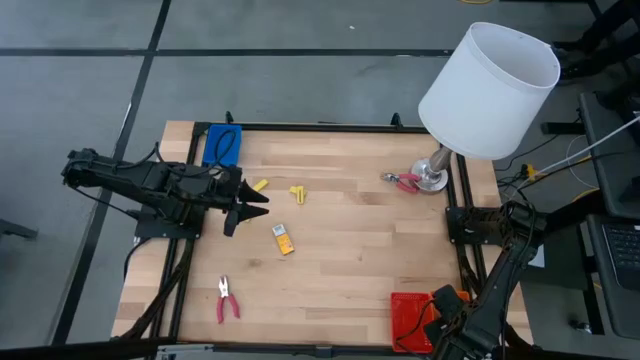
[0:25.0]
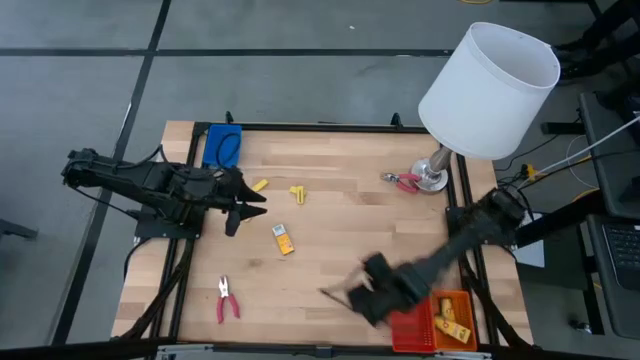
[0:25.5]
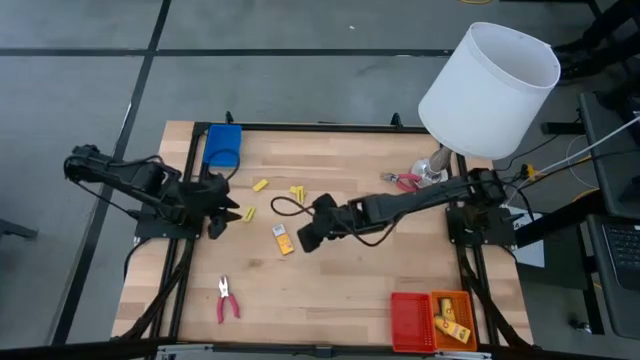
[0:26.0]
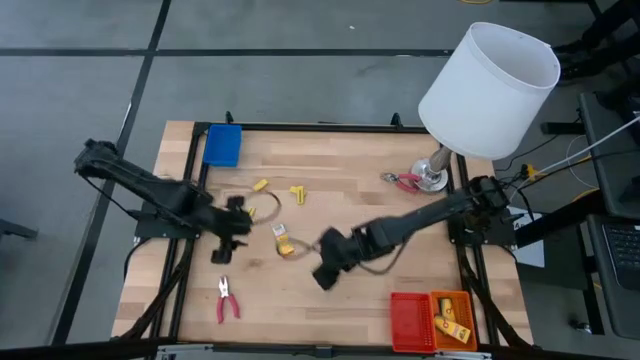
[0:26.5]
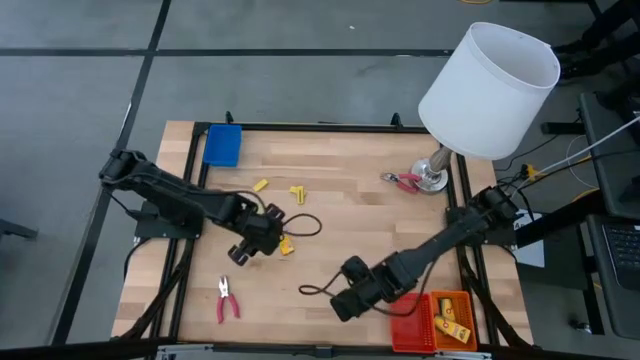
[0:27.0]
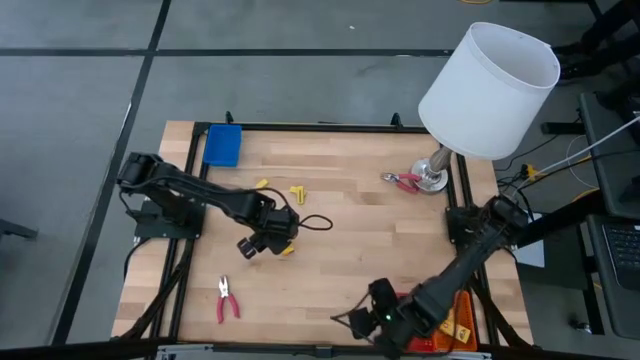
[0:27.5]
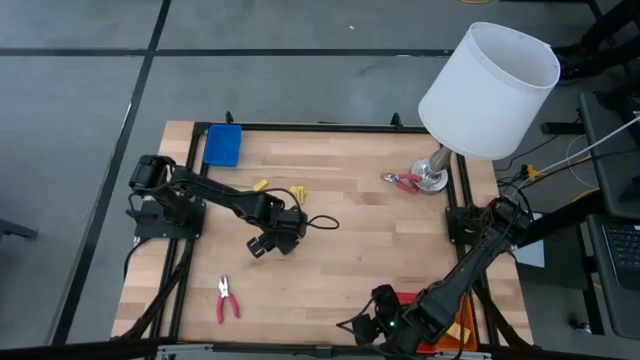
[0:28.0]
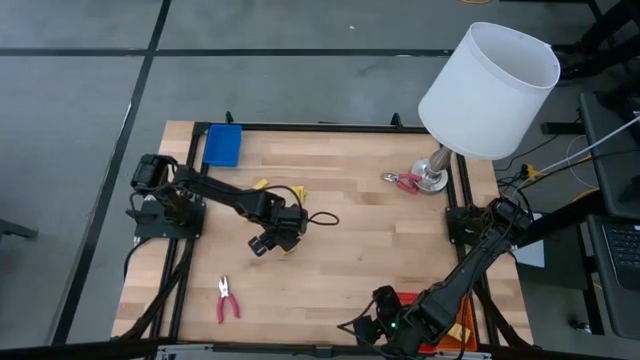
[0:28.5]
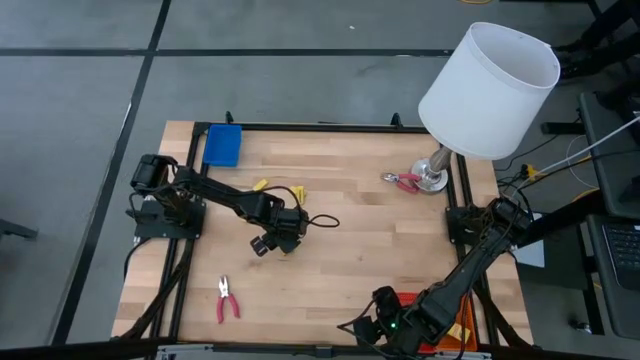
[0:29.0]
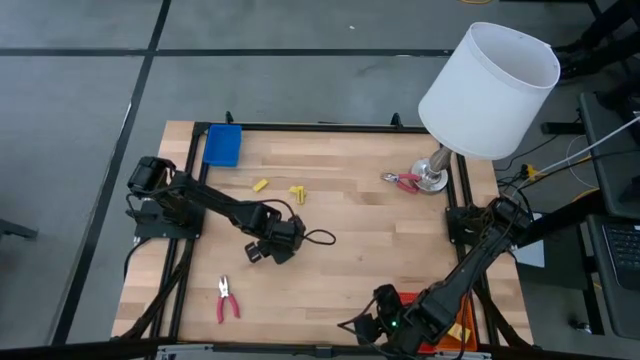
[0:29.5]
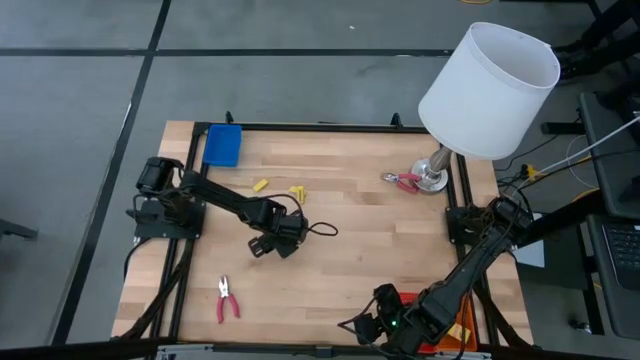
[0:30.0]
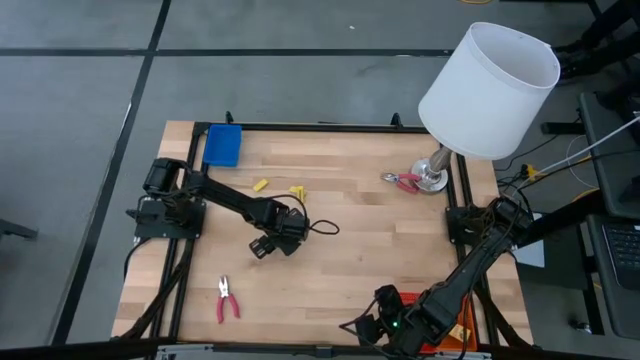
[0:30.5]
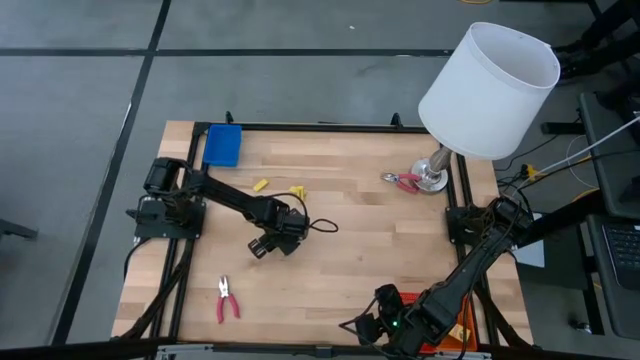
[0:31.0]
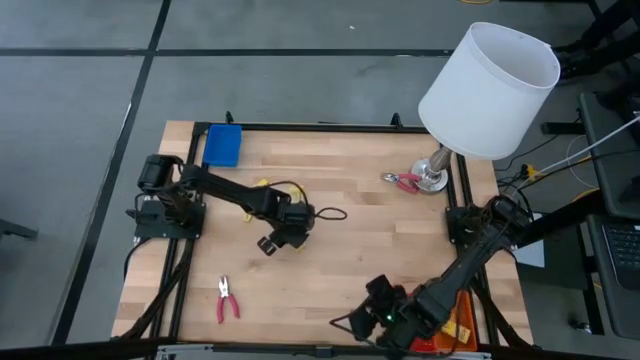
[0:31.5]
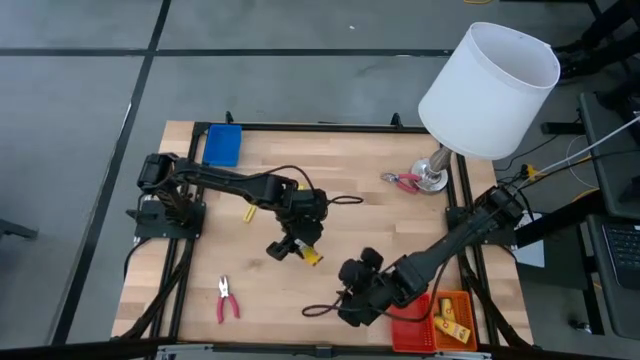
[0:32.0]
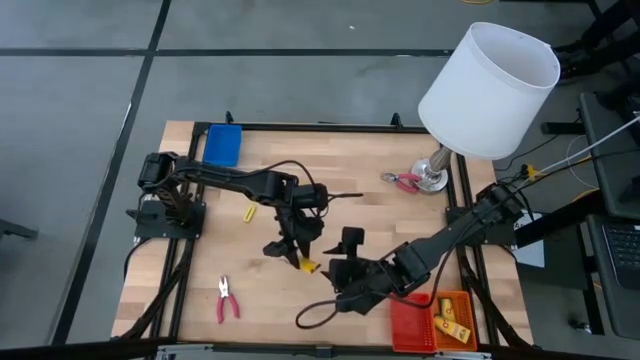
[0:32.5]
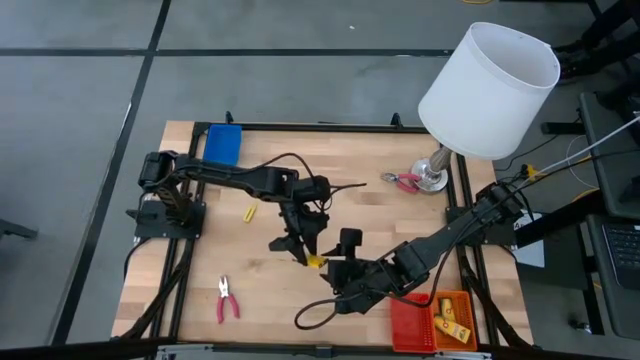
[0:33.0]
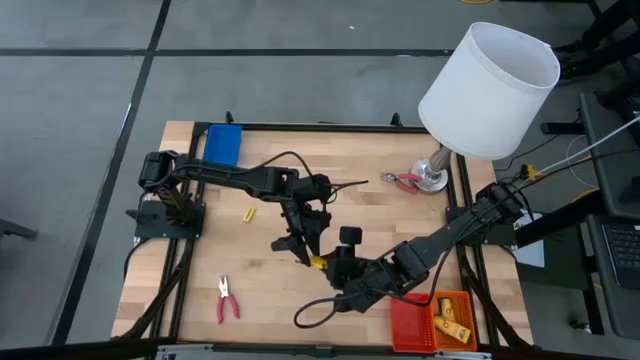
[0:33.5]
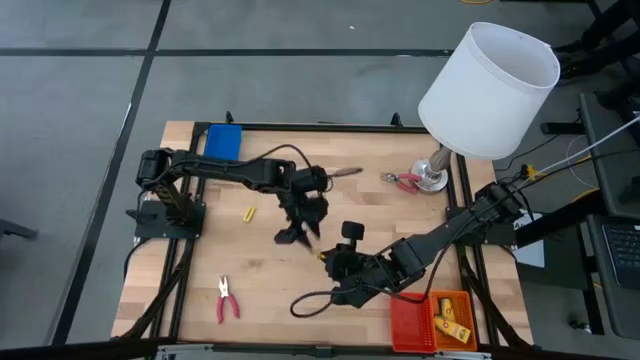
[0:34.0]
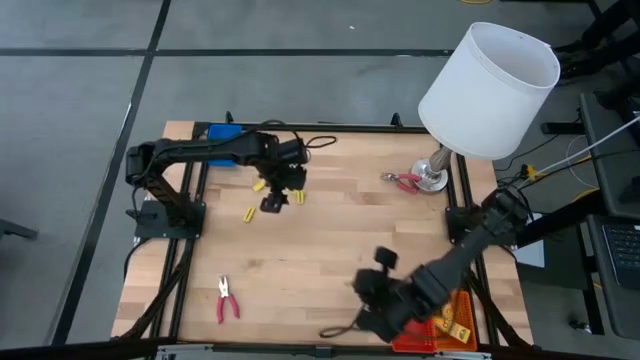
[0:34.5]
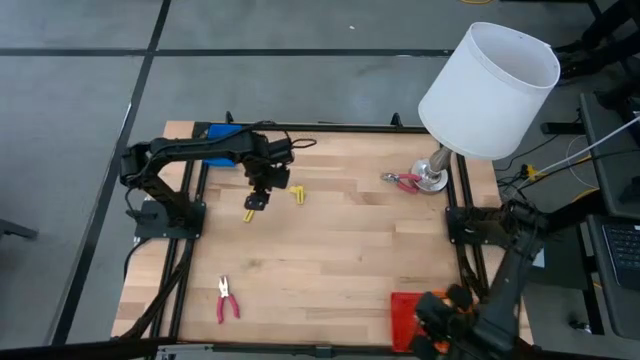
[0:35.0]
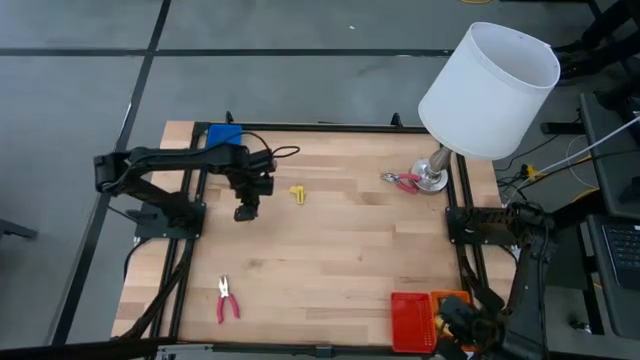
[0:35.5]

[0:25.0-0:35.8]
Task: Pick & Place School Supplies
Put the yellow crayon box into the orange bin

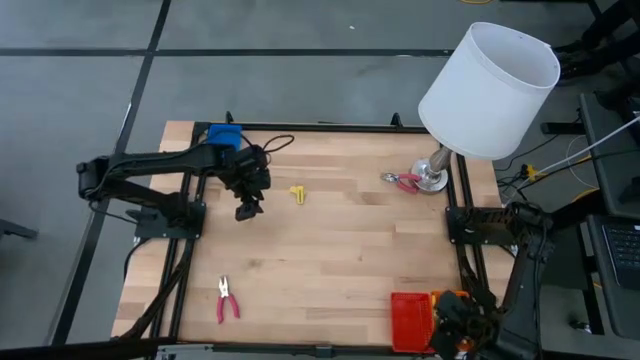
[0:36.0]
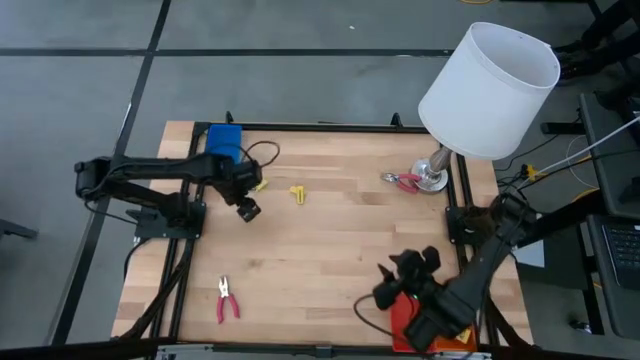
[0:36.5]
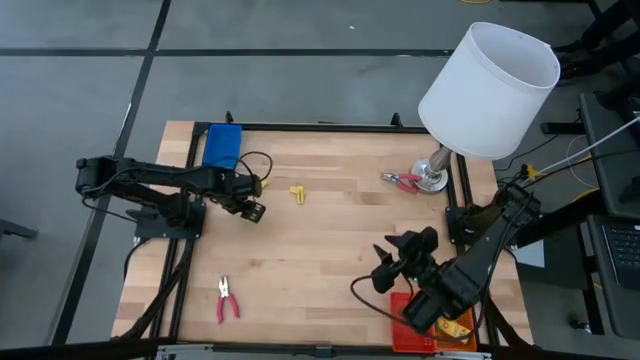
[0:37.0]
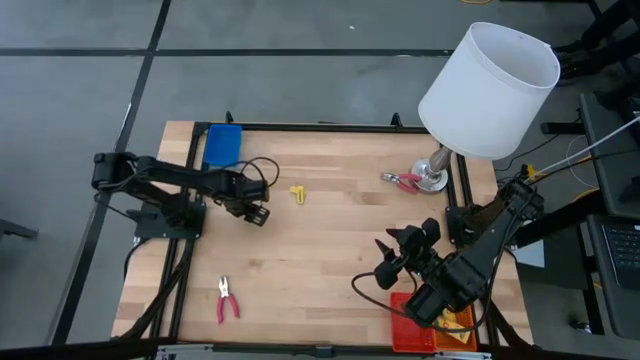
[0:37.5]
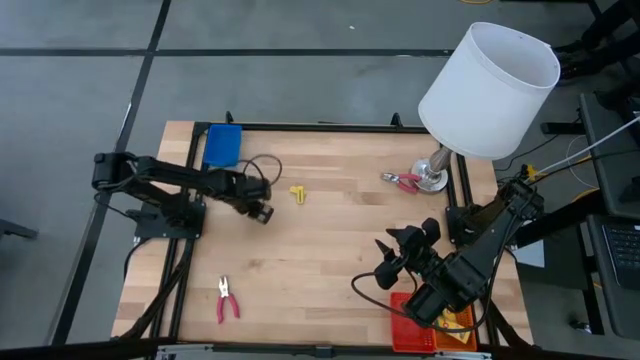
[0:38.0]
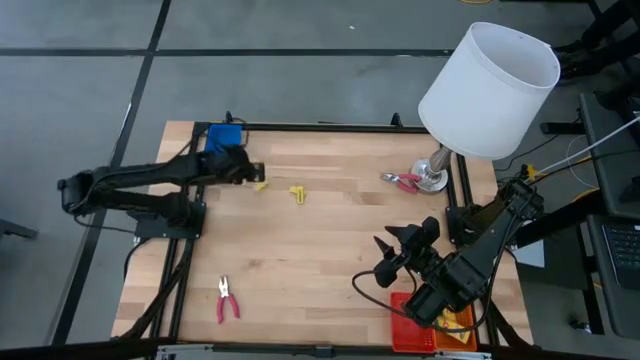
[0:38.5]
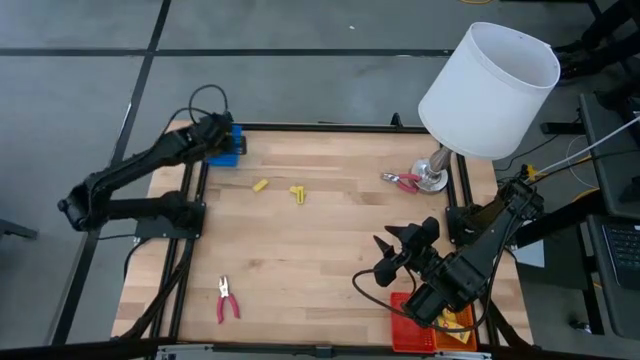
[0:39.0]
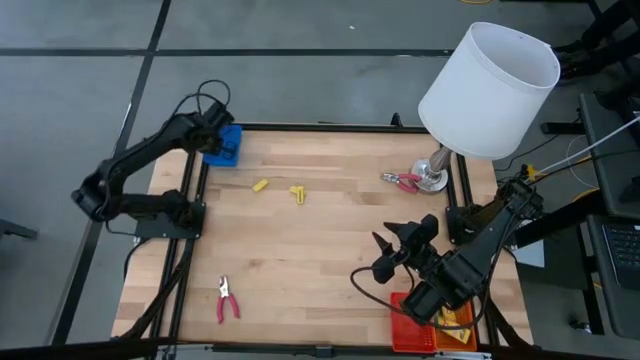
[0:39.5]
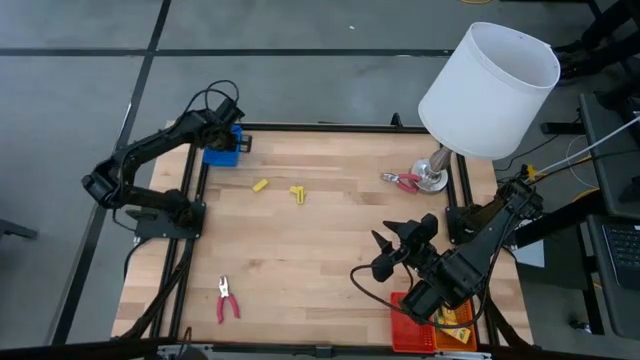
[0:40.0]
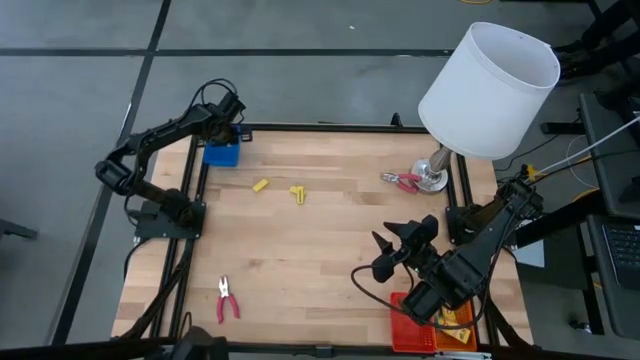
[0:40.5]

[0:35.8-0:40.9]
Put the yellow eraser into the blue bin

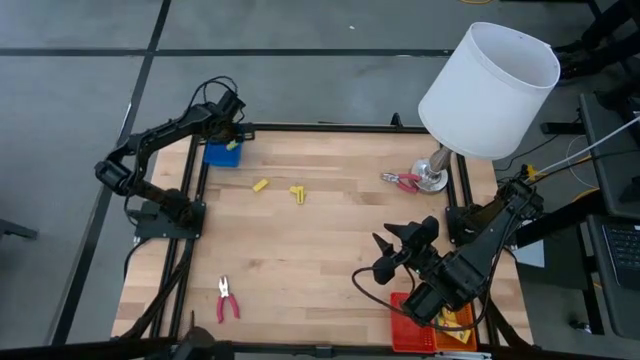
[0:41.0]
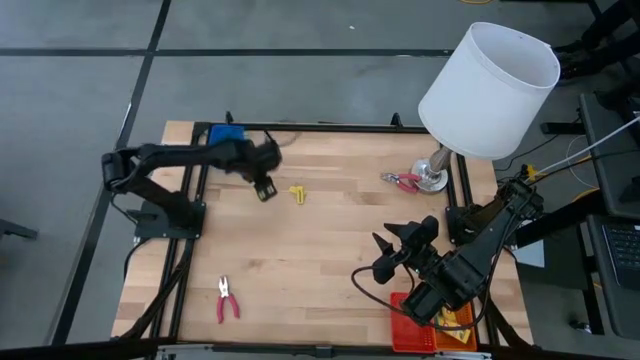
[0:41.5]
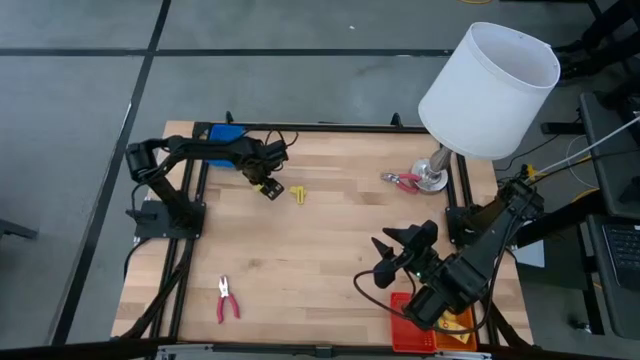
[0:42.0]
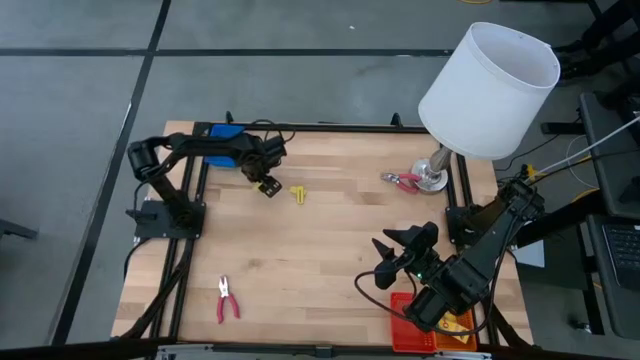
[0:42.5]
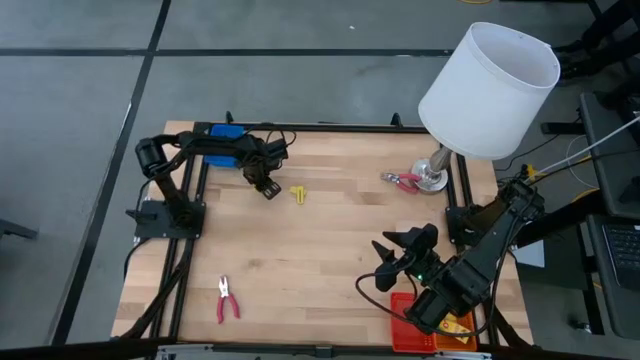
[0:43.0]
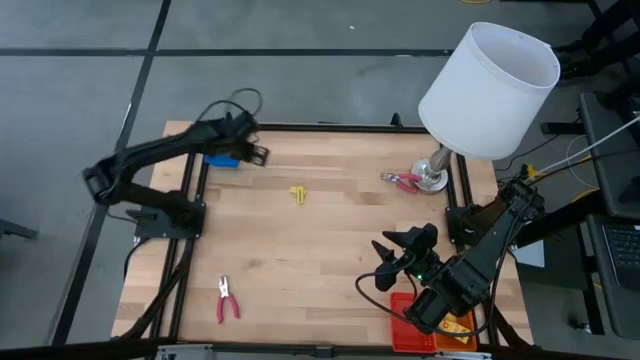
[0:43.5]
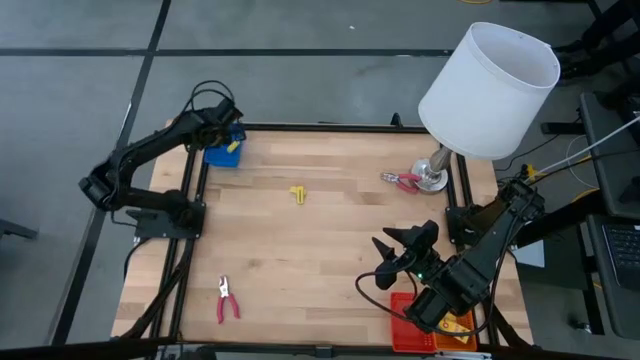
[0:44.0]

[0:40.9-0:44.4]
Put the yellow eraser into the blue bin

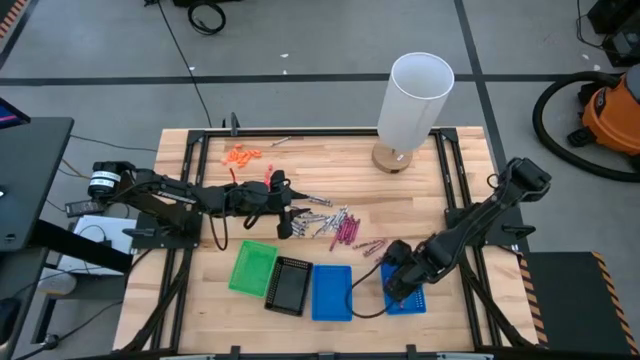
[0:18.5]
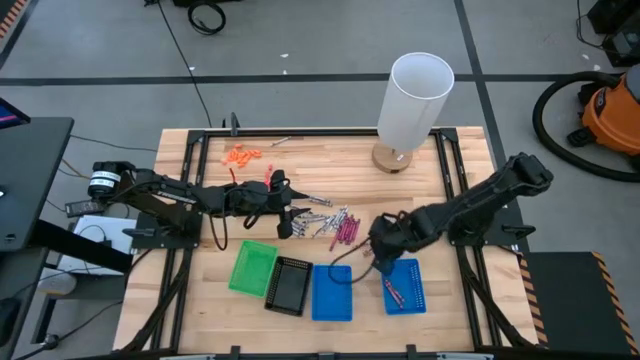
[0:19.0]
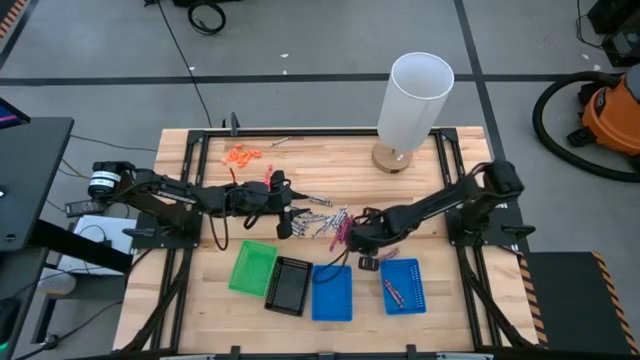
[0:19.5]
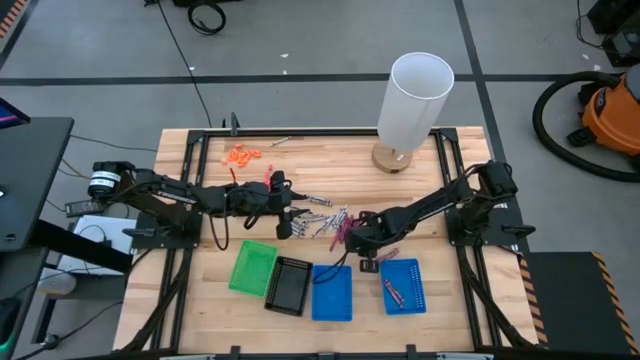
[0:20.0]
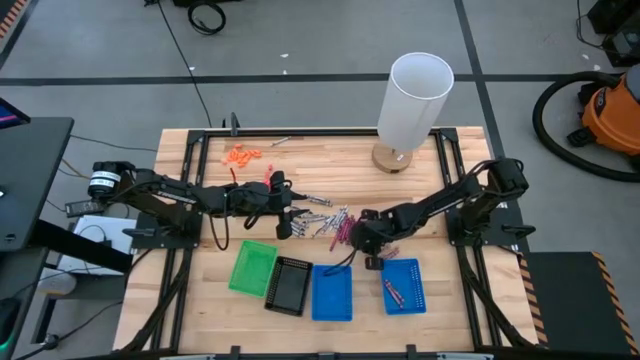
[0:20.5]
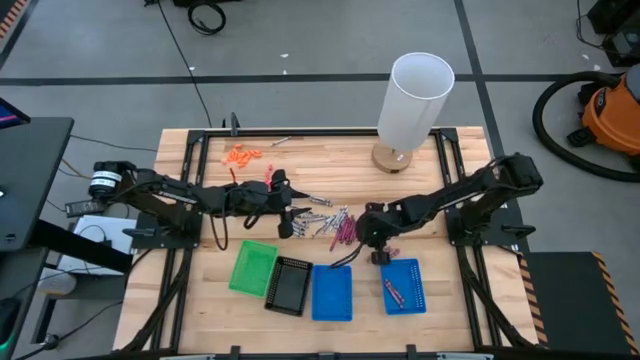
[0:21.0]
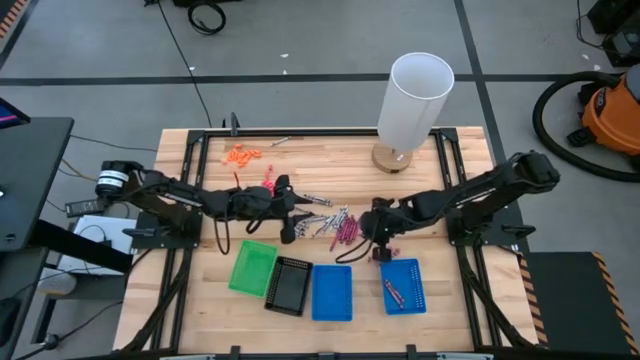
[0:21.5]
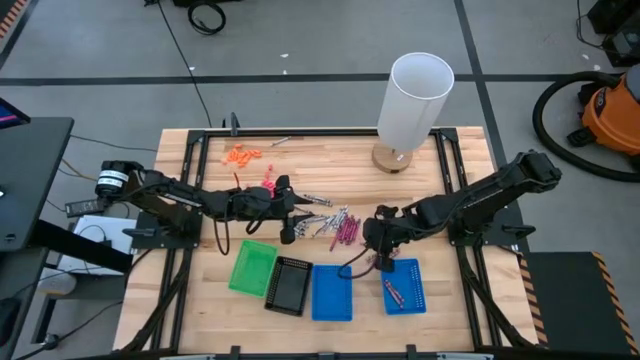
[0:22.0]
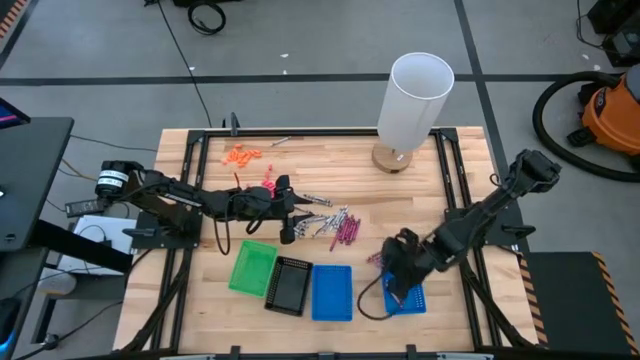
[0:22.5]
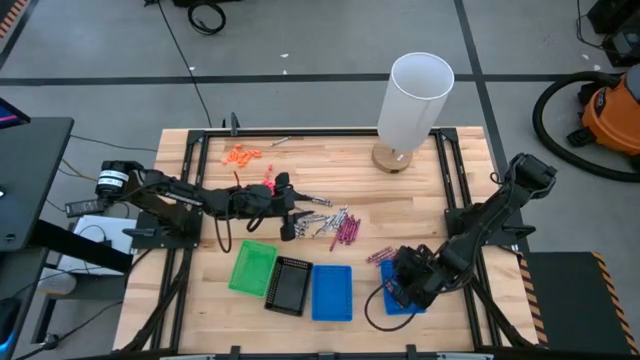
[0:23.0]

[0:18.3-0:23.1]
Task: Sort crayons
Put the pink crayon into the right blue bin
